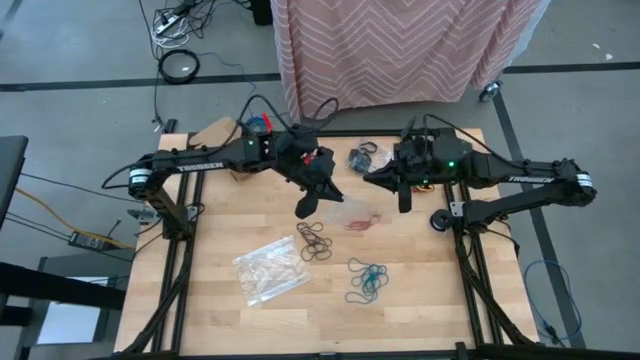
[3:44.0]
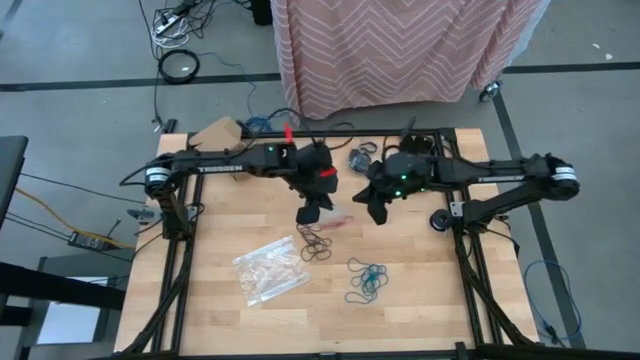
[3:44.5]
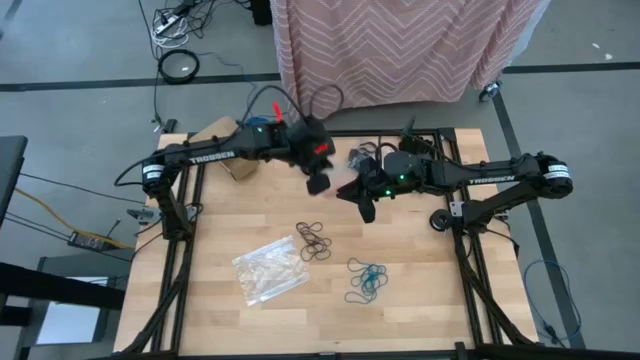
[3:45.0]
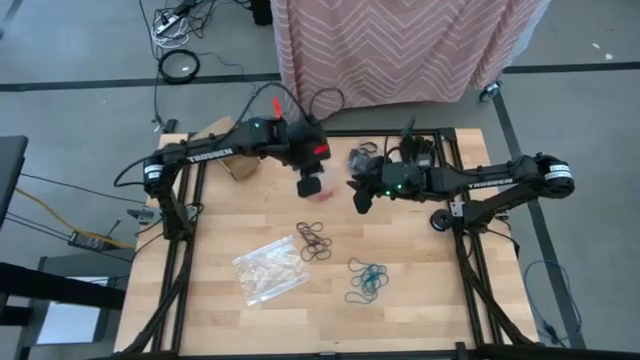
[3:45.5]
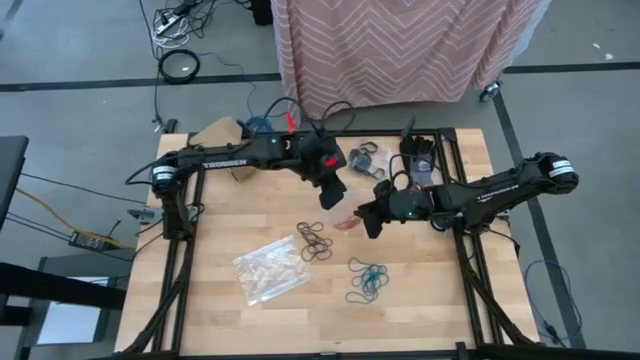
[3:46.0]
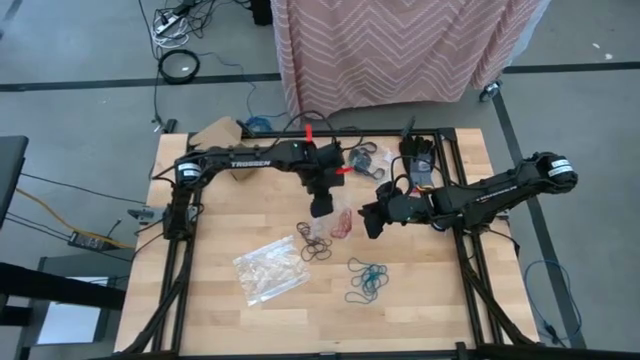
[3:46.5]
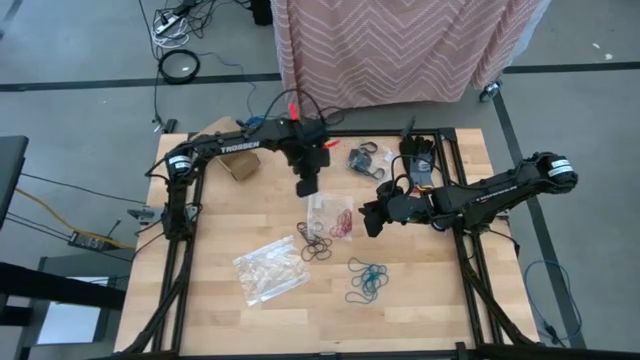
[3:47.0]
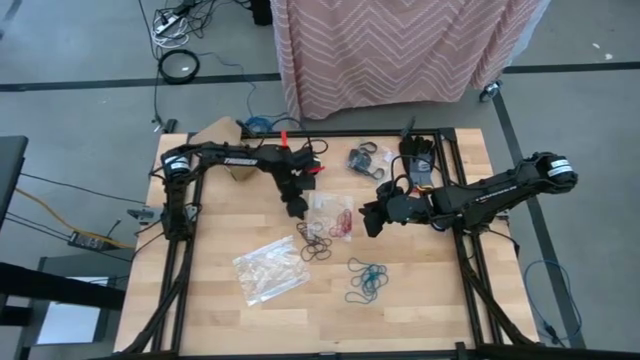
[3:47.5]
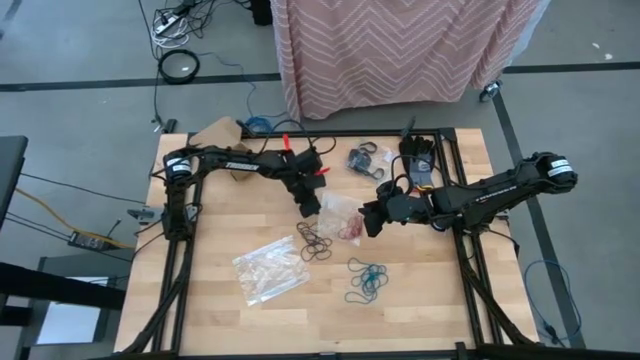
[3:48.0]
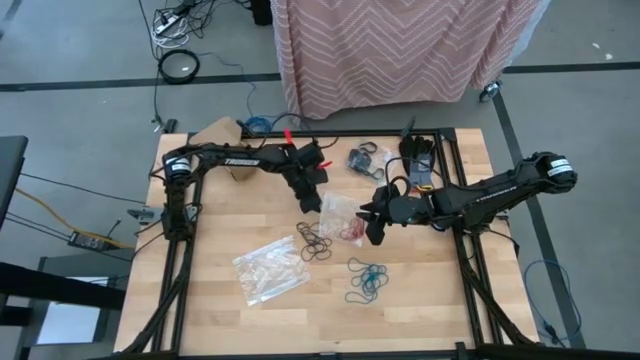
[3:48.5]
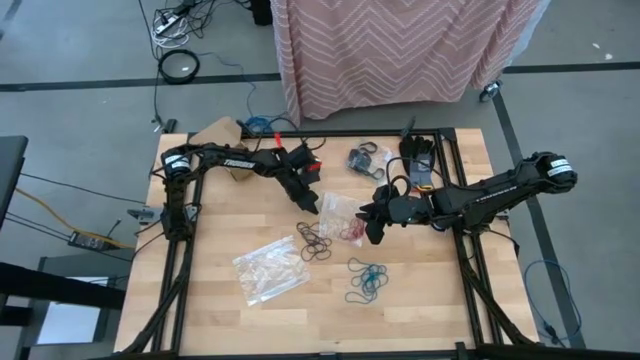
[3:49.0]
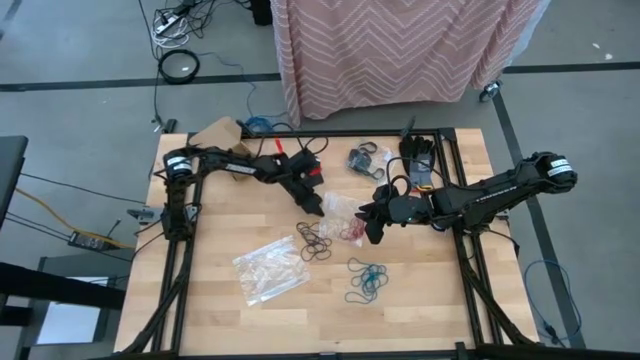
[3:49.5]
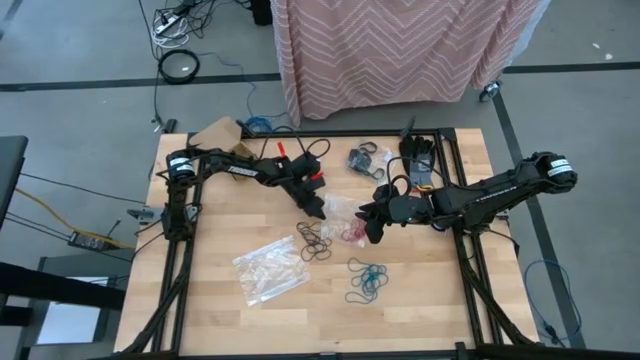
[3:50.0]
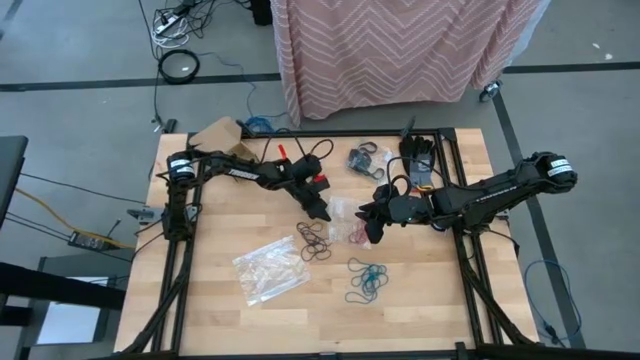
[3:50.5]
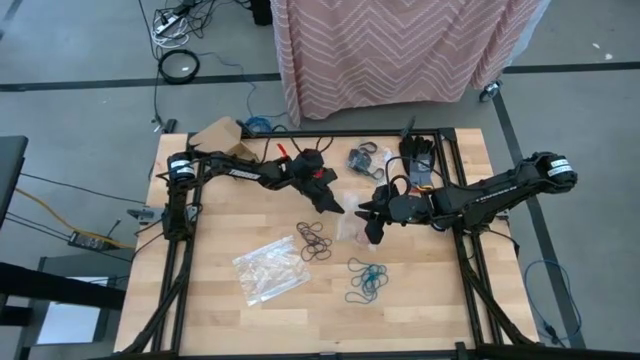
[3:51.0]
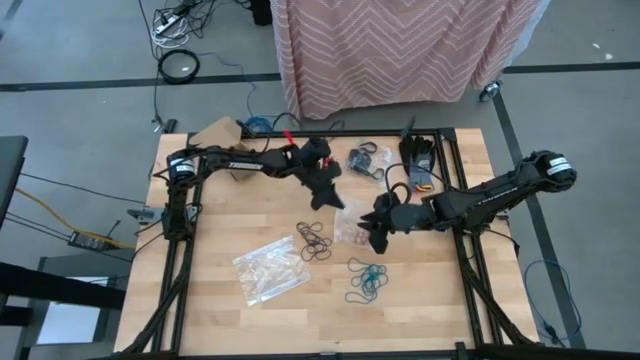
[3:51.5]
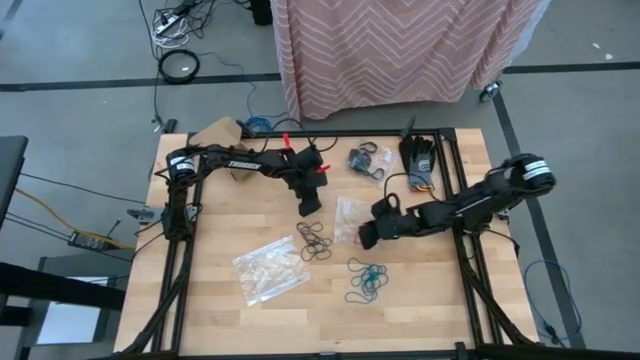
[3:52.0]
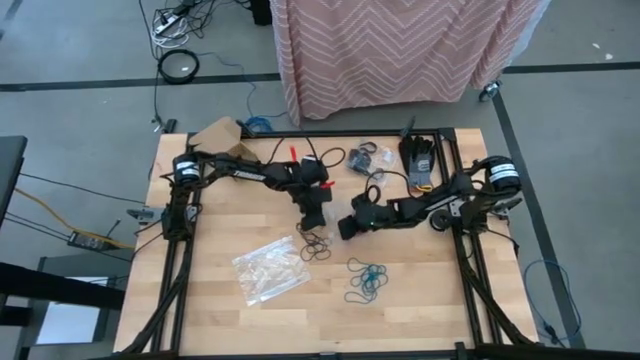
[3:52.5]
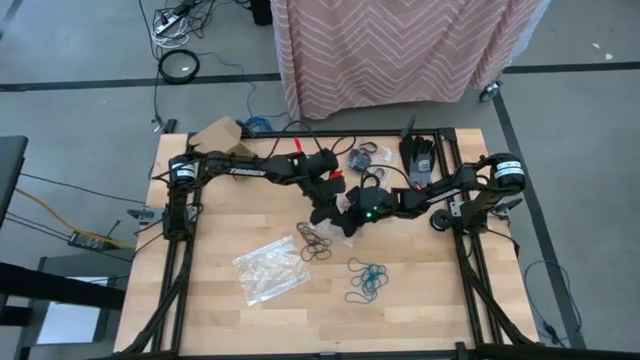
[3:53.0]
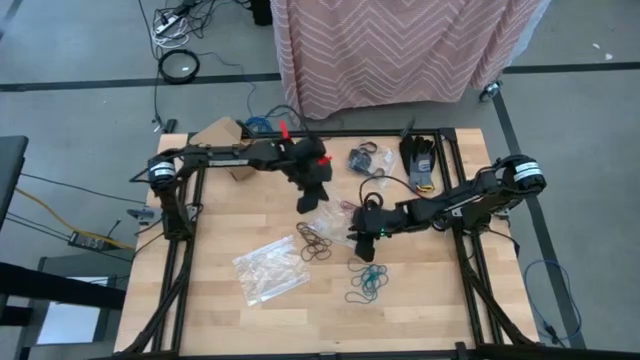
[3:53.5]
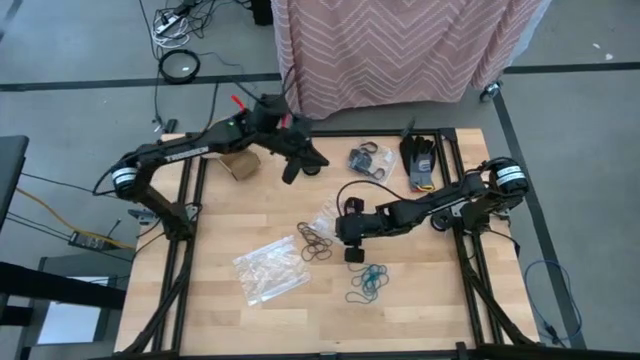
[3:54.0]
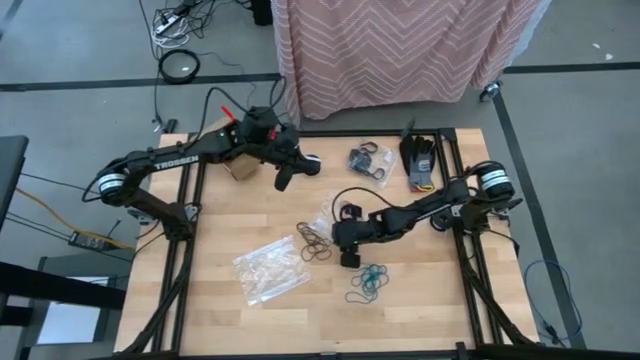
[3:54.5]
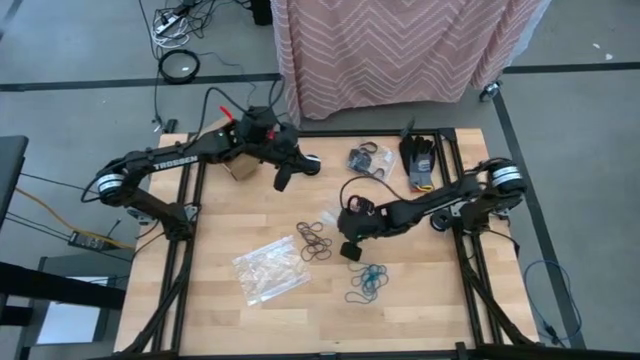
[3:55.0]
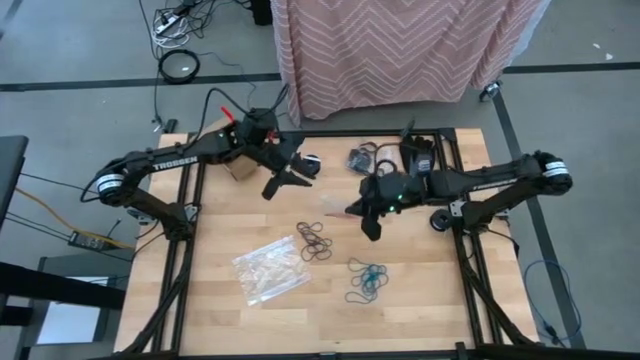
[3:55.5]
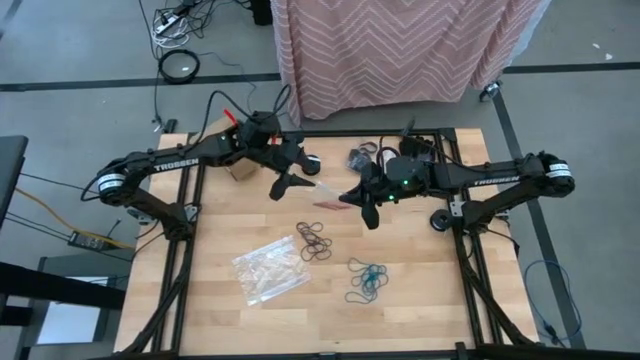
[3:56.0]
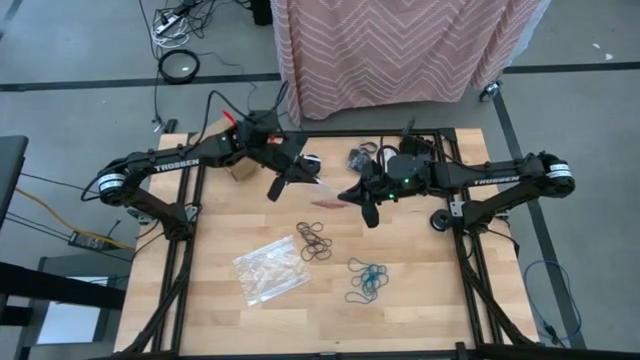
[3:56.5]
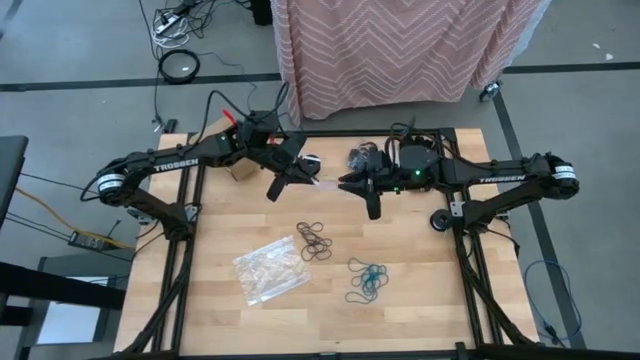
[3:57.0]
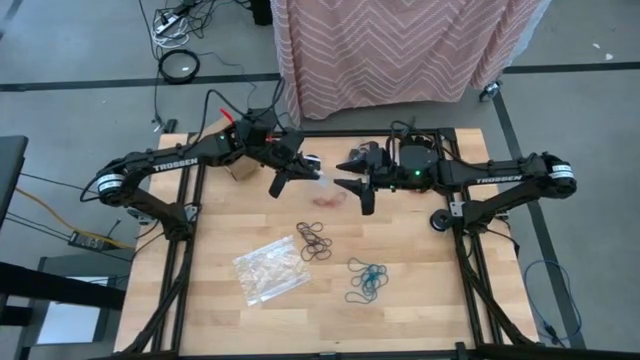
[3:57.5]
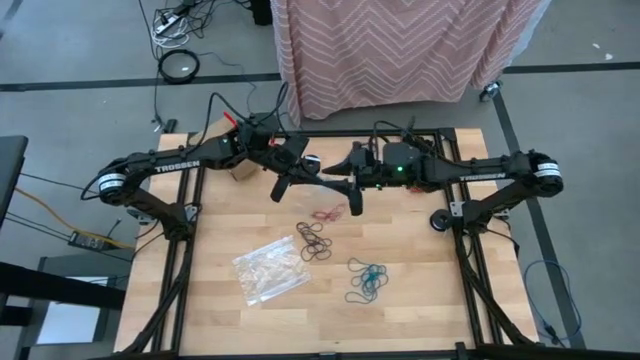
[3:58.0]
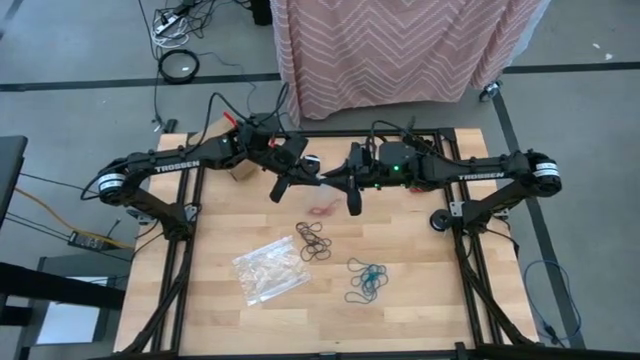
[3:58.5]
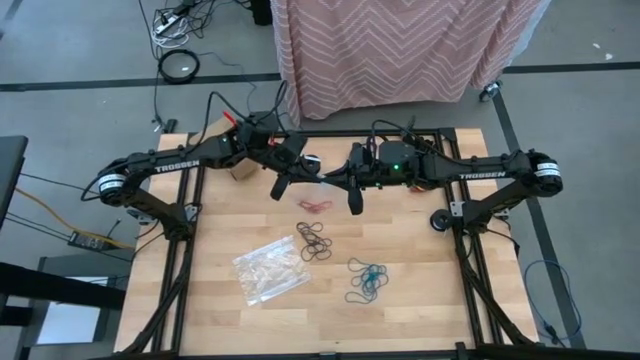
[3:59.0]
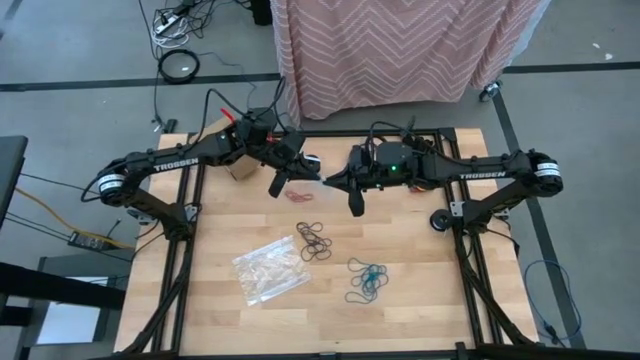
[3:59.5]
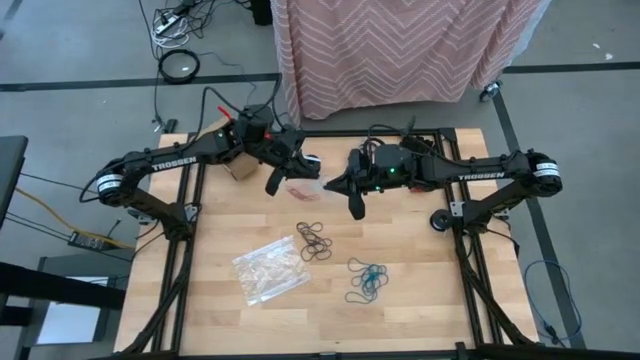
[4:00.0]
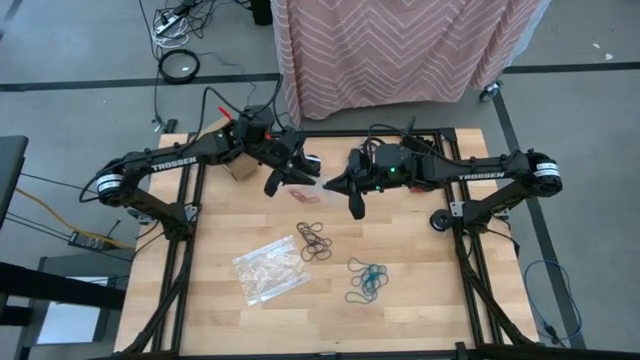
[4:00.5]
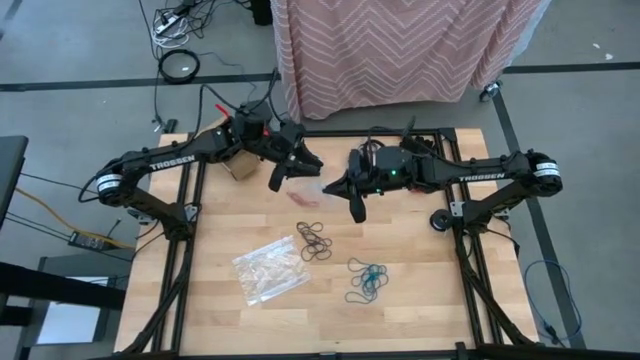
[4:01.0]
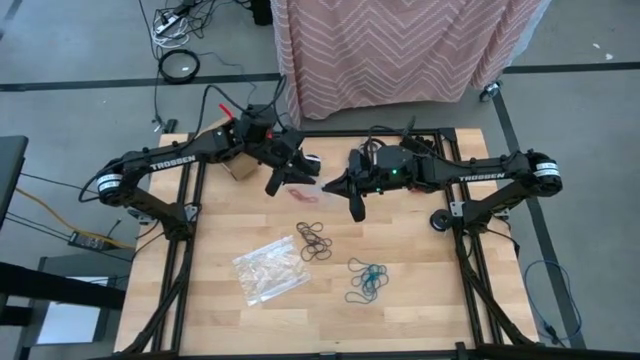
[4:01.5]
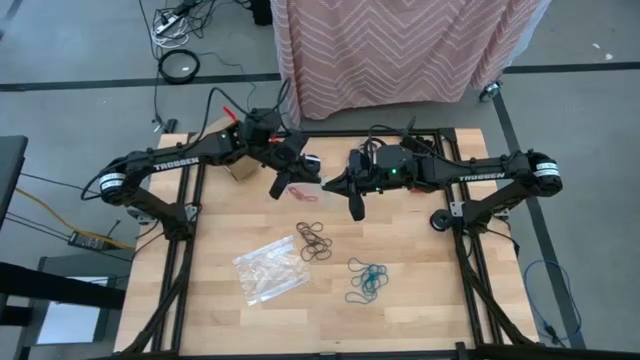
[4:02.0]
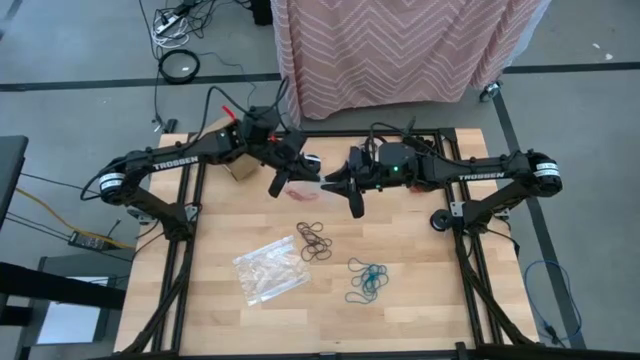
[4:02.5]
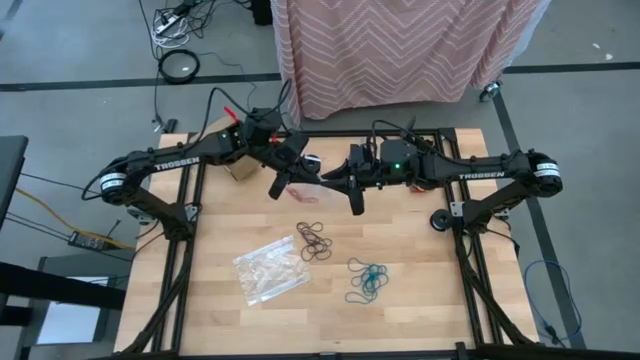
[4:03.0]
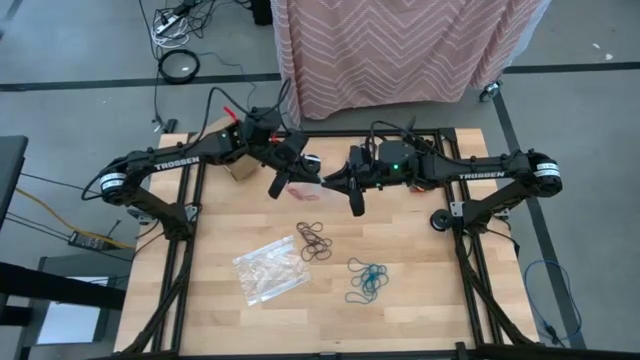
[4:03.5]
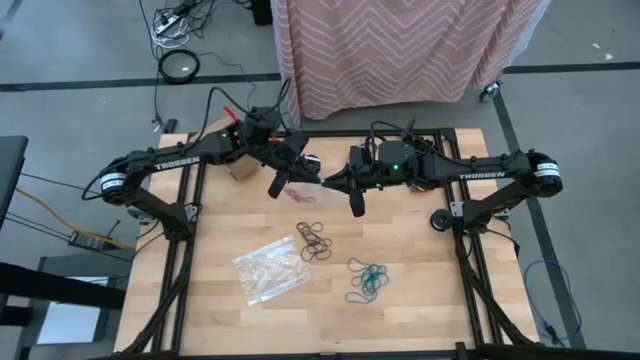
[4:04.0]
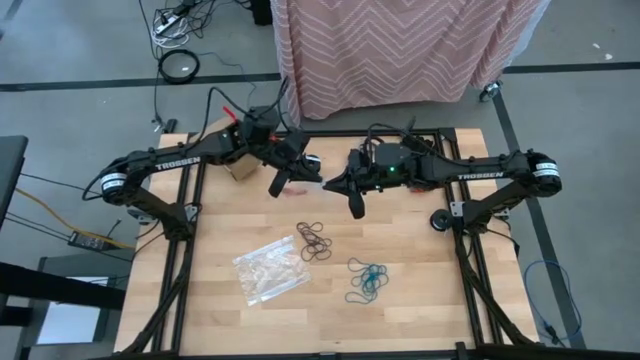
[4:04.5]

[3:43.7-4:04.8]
Task: Sort rubber bands
Close the transparent zip bag
